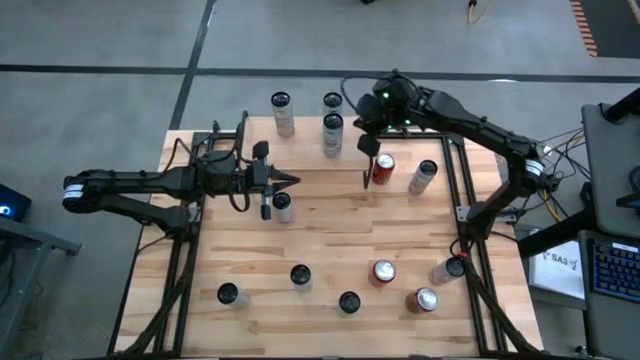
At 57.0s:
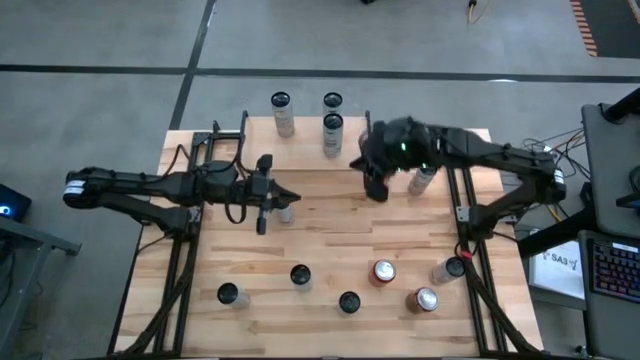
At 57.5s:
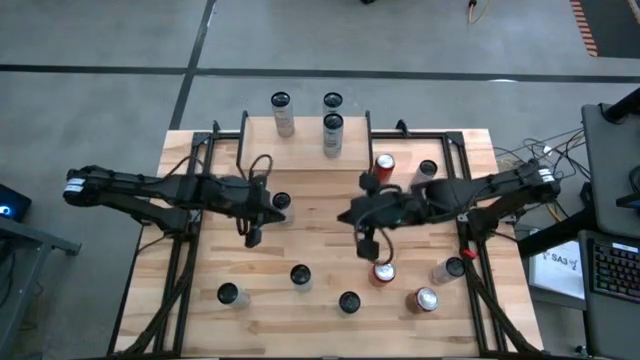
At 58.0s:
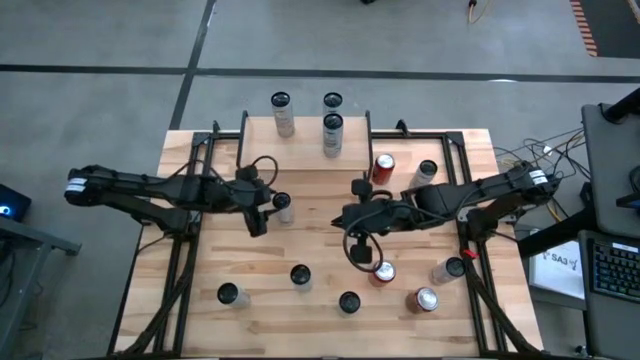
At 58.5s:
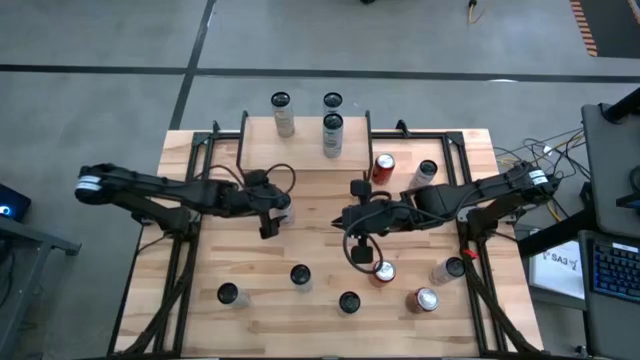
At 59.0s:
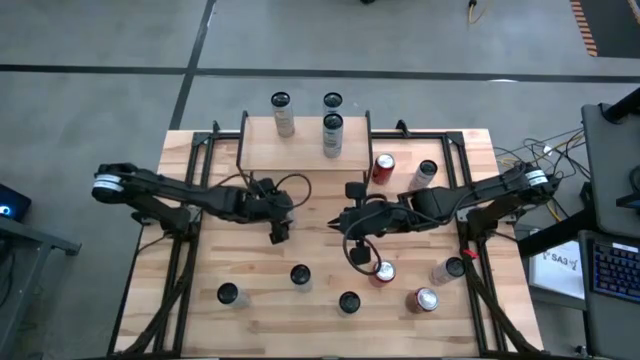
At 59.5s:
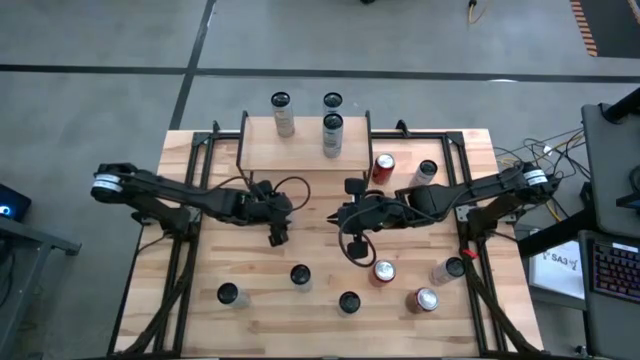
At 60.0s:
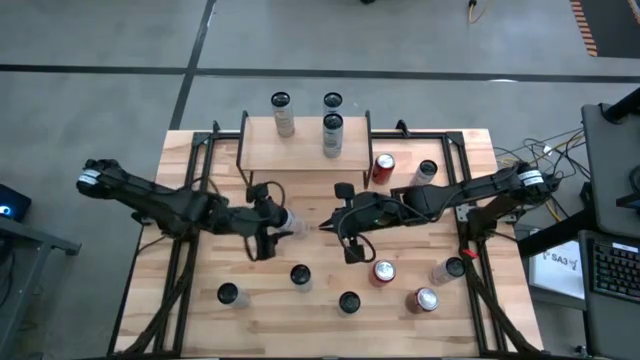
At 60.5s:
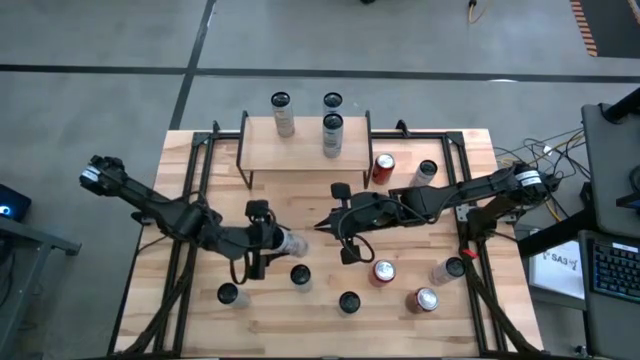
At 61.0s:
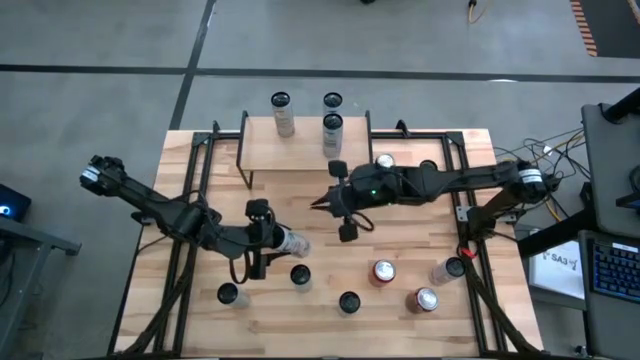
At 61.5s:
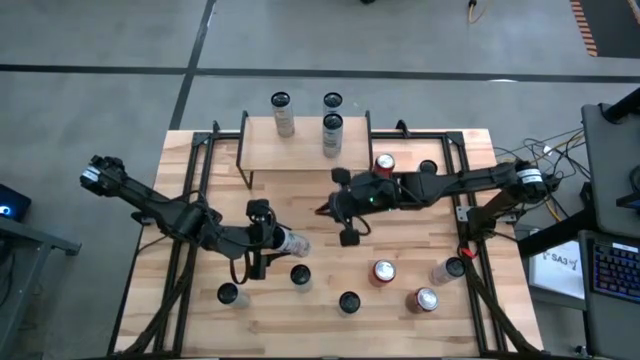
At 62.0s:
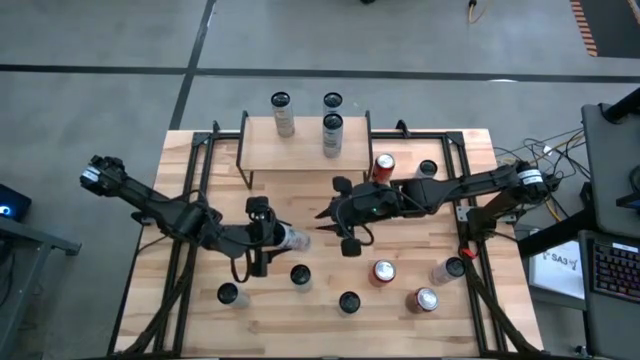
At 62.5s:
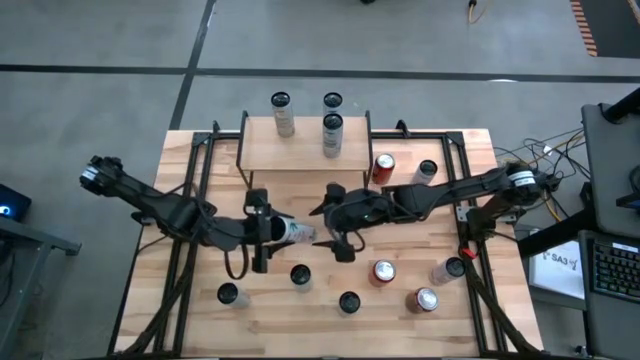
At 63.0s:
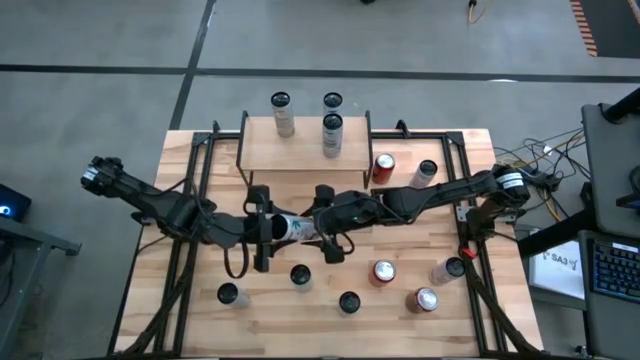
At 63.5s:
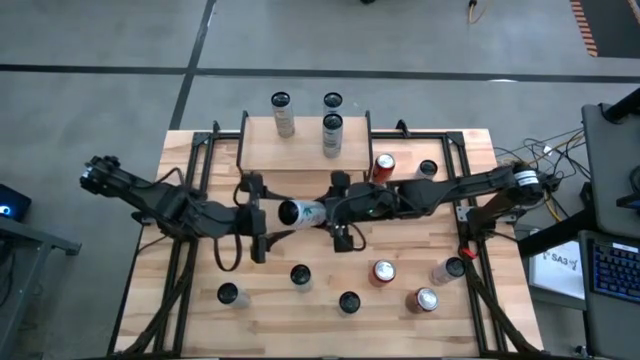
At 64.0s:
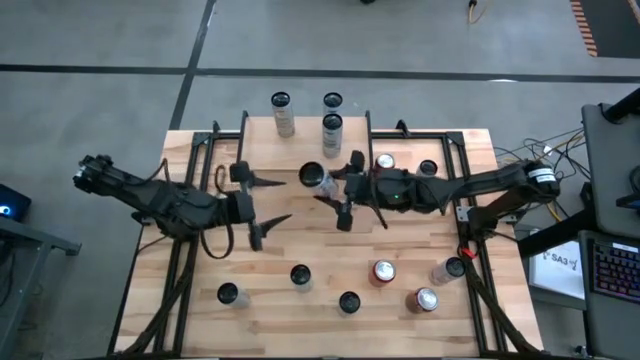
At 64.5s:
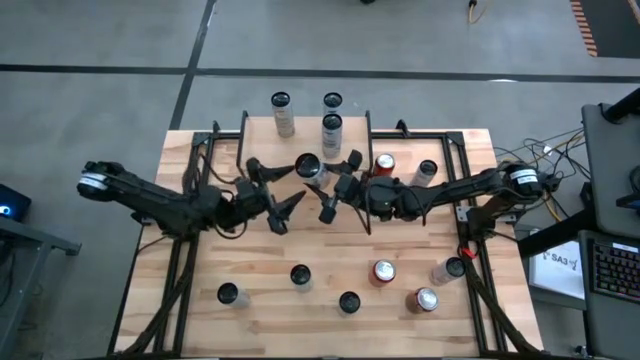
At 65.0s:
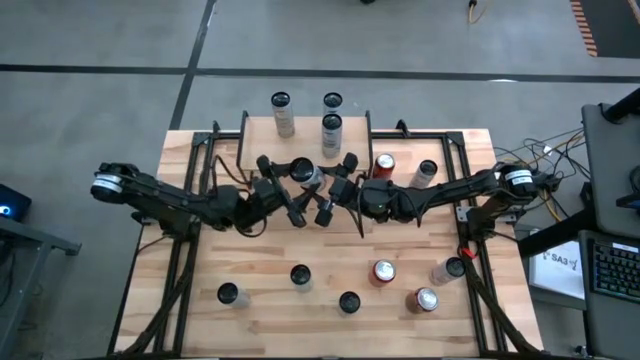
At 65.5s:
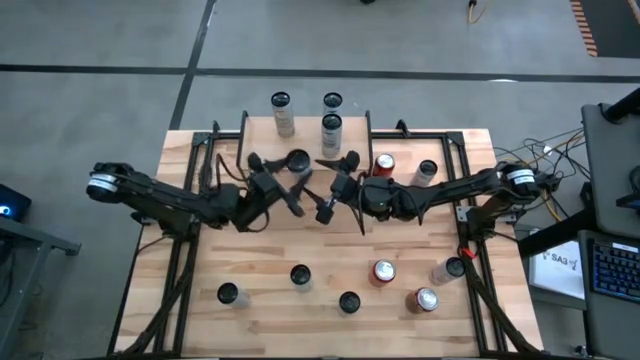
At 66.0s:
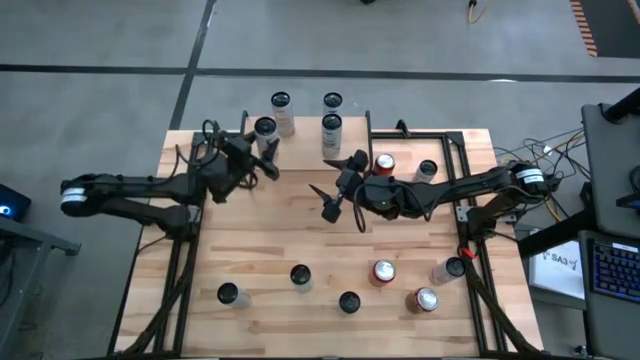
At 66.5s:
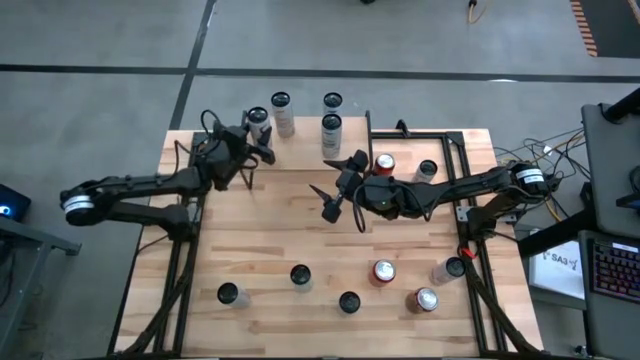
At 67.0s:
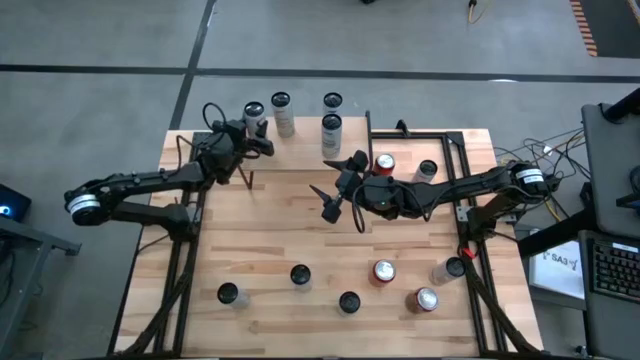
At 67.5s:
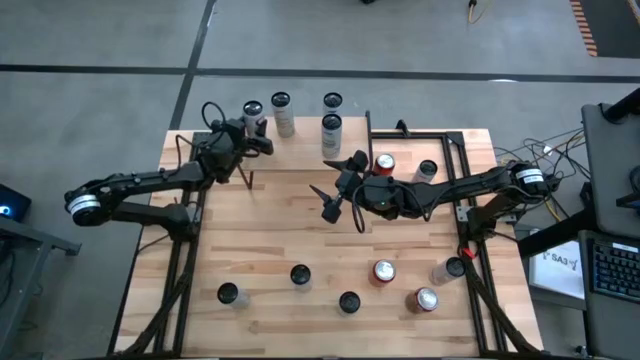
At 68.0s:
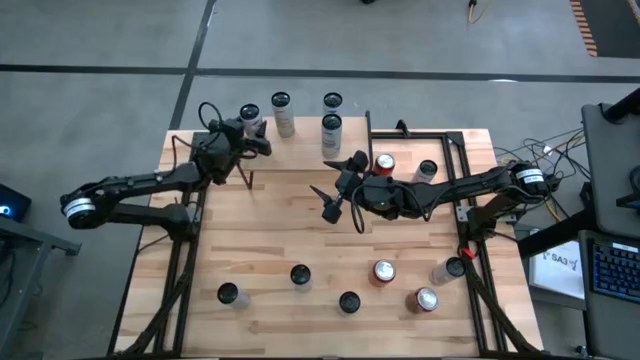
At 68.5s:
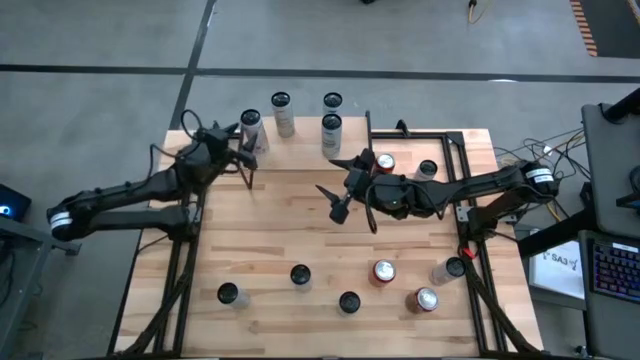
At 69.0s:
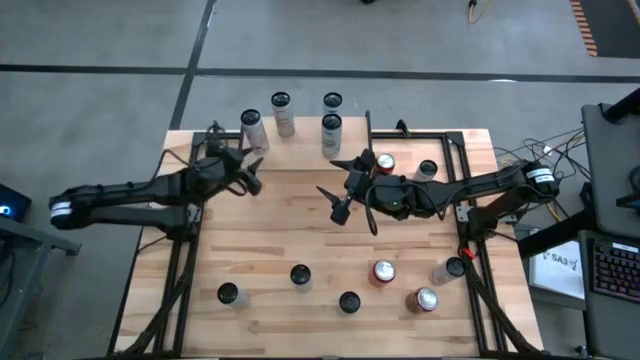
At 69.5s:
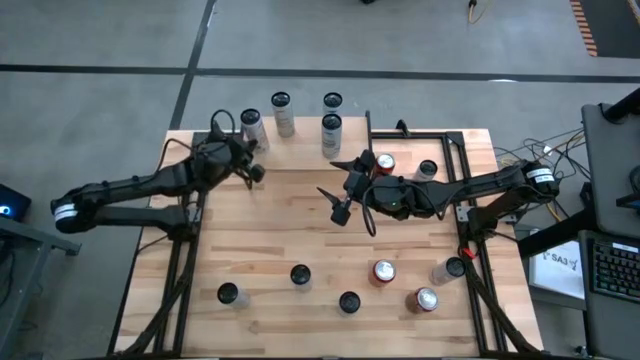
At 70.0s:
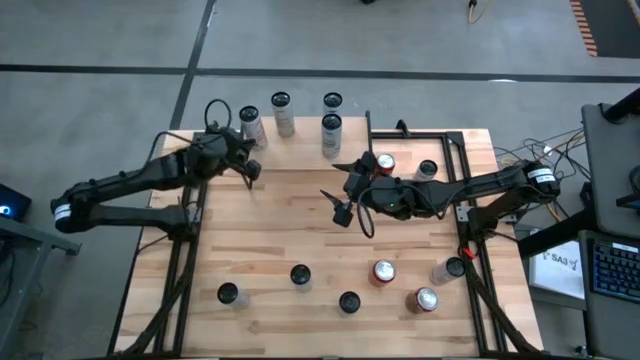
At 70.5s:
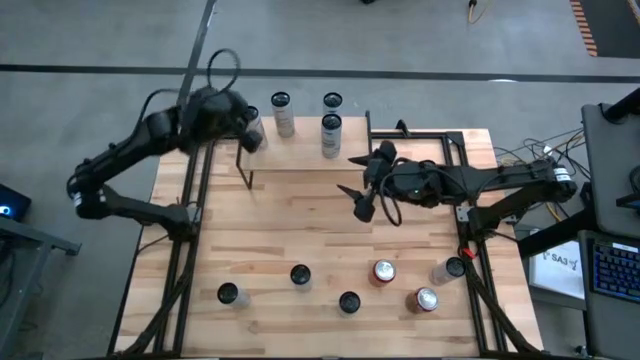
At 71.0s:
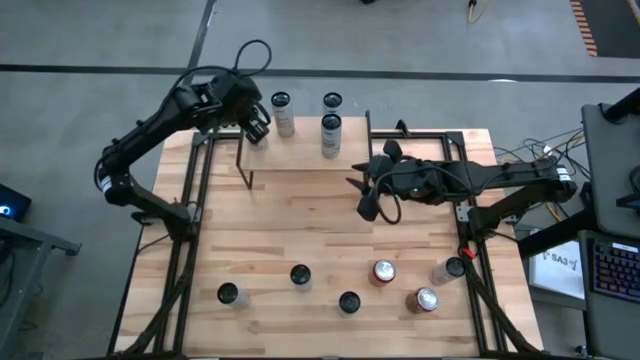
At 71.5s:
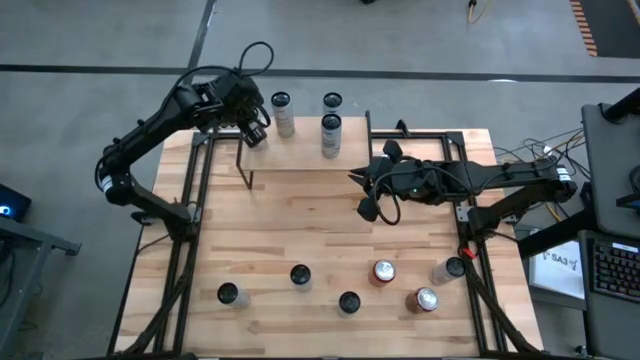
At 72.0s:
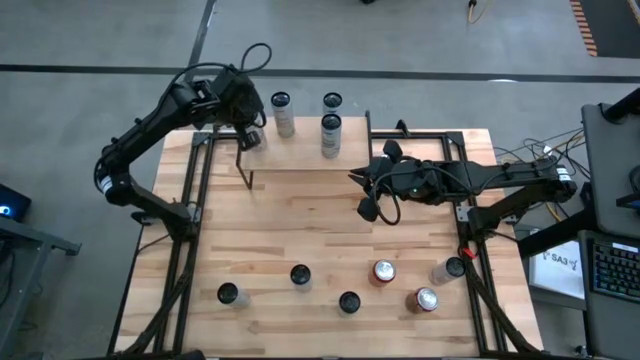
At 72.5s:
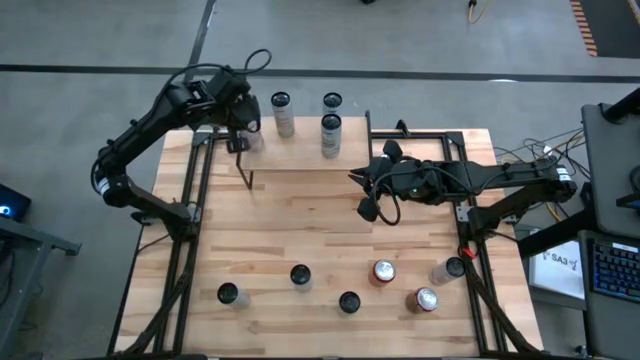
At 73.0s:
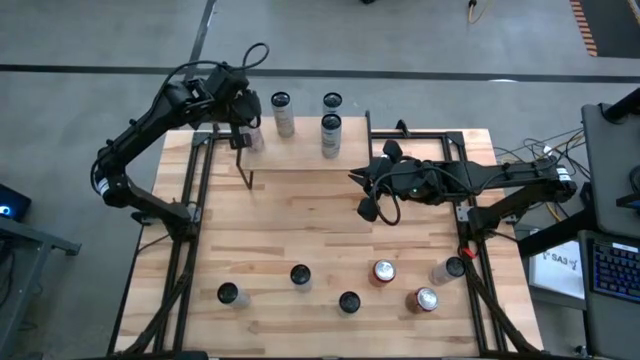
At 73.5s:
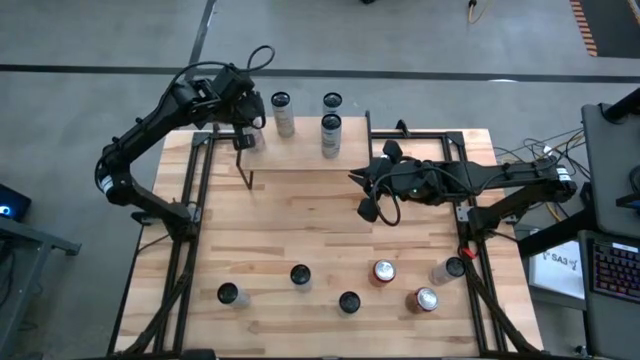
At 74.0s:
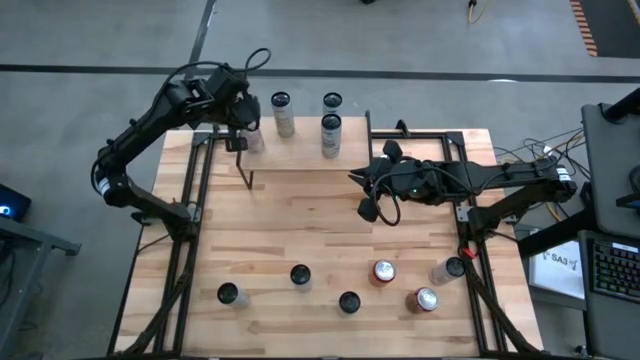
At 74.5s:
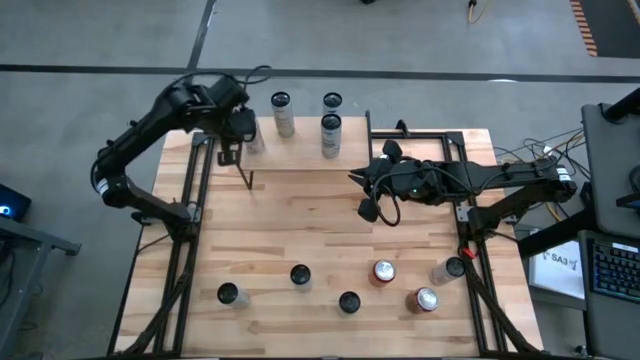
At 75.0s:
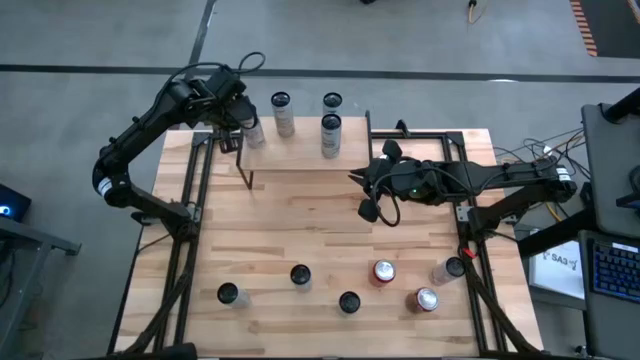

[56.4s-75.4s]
Task: Place canned beverage on shelf
Put the white soda can on the shelf

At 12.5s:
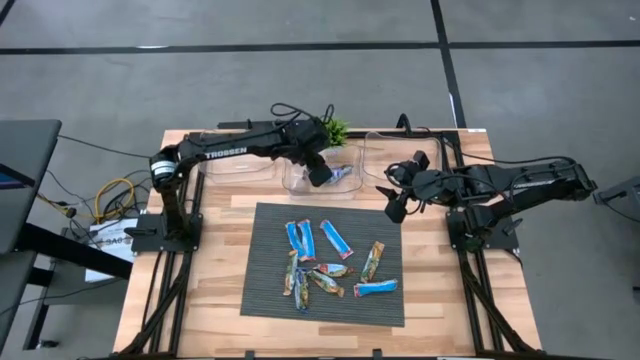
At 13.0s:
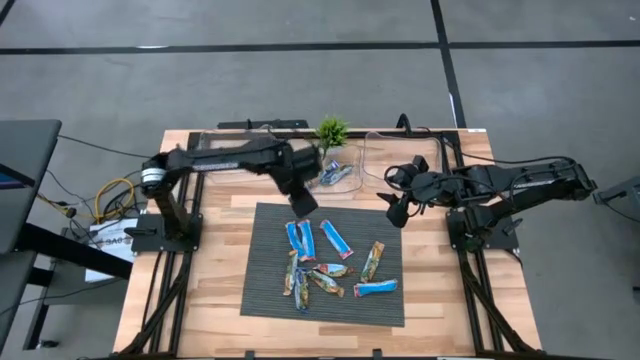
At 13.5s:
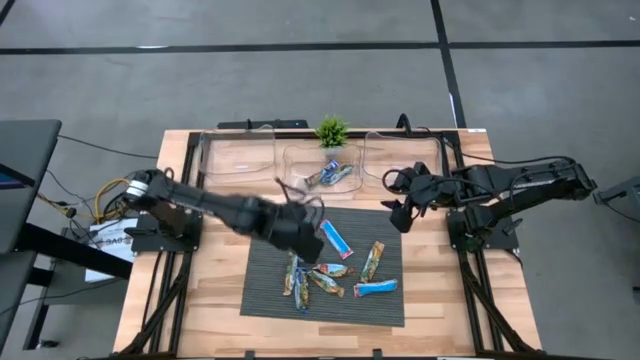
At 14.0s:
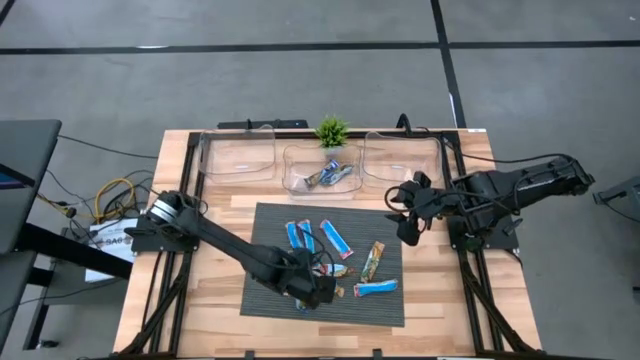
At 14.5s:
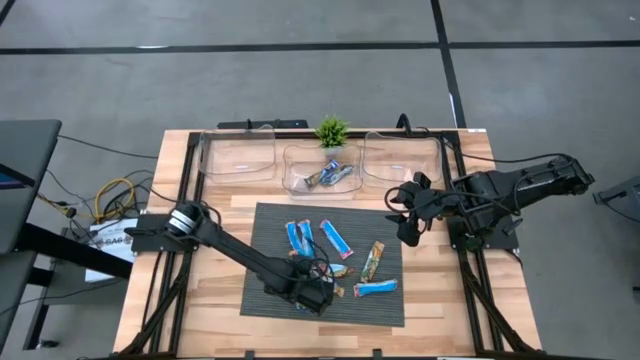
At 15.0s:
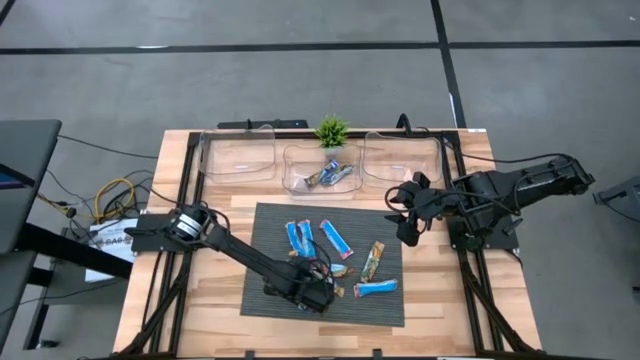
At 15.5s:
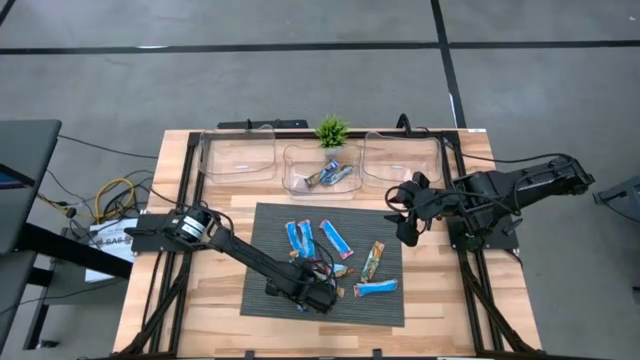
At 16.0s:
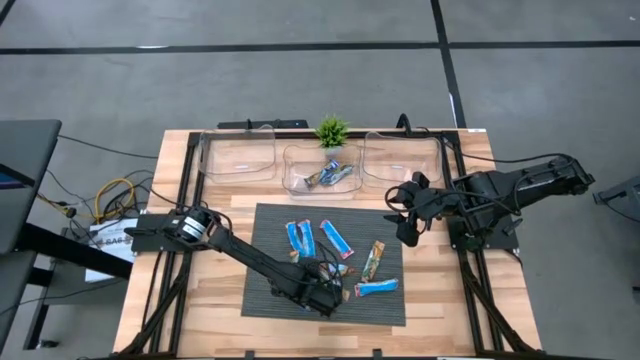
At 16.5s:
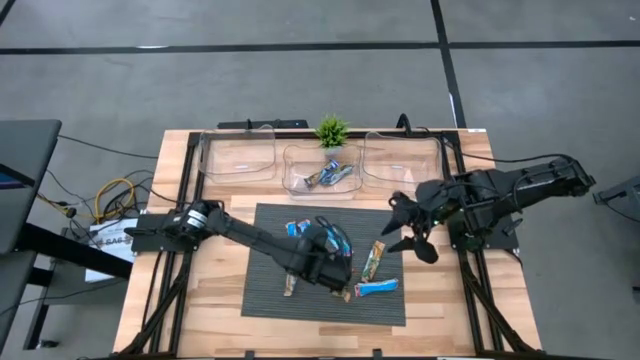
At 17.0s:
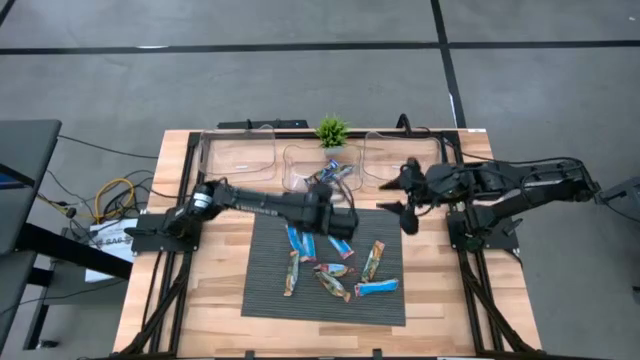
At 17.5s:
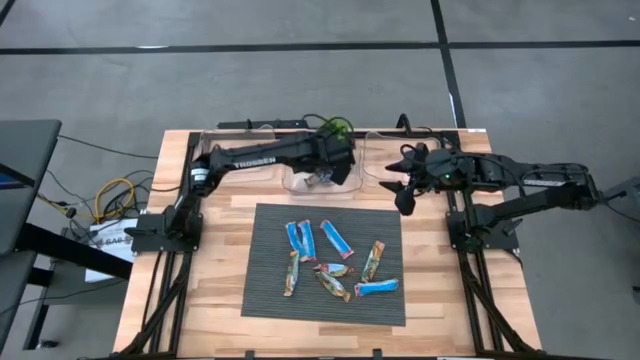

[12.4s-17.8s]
Task: Pick and place Granola Bars by type
Put the blue granola bar into the middle transparent bin
